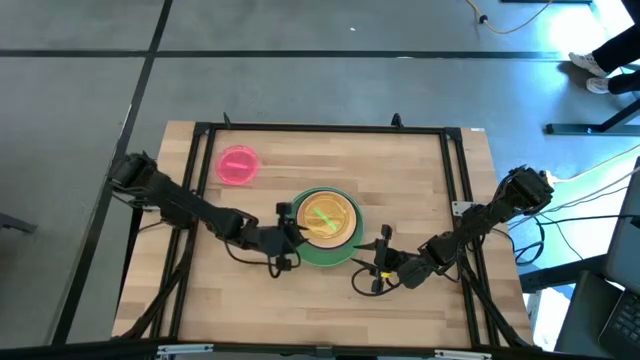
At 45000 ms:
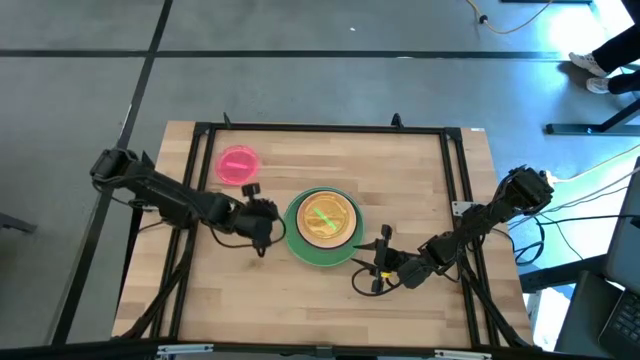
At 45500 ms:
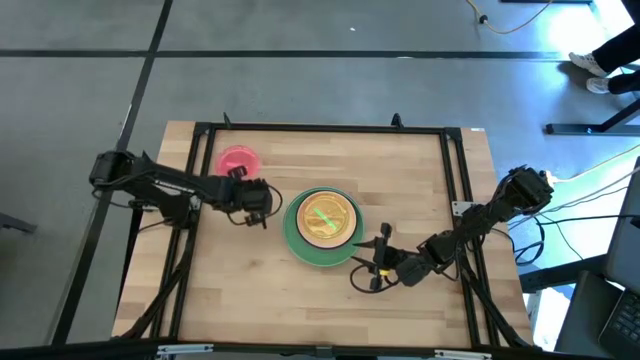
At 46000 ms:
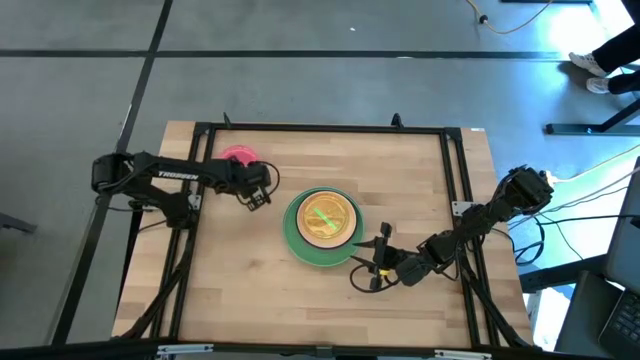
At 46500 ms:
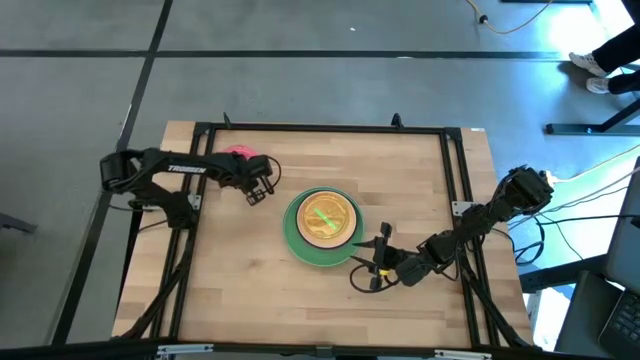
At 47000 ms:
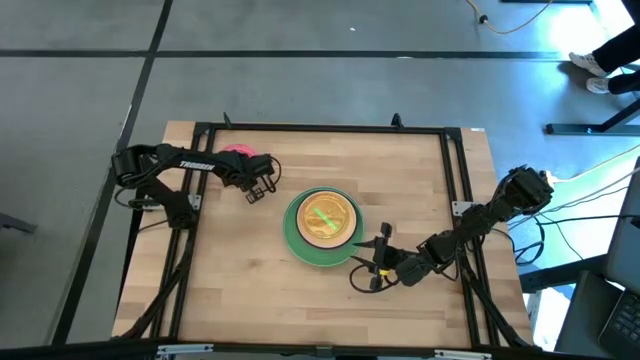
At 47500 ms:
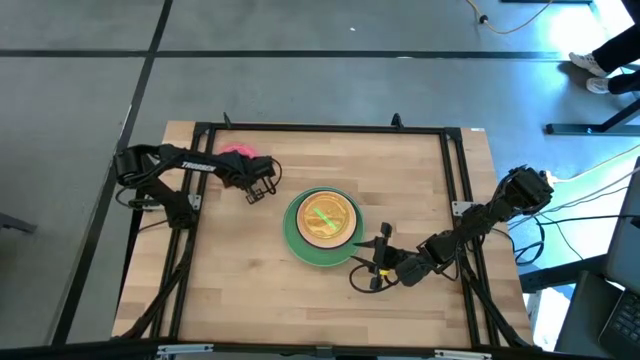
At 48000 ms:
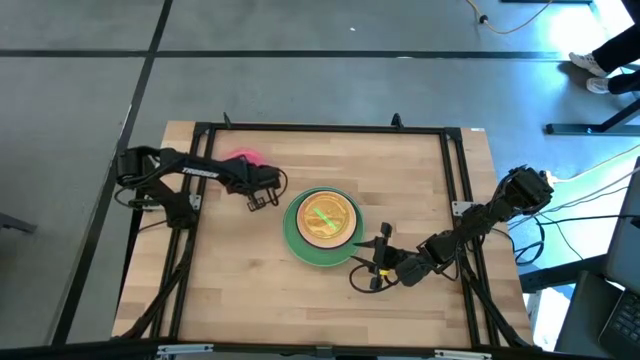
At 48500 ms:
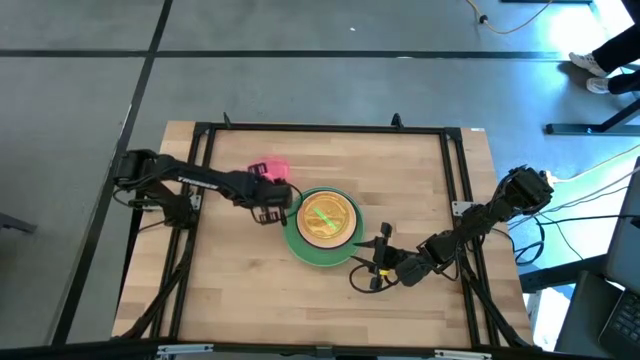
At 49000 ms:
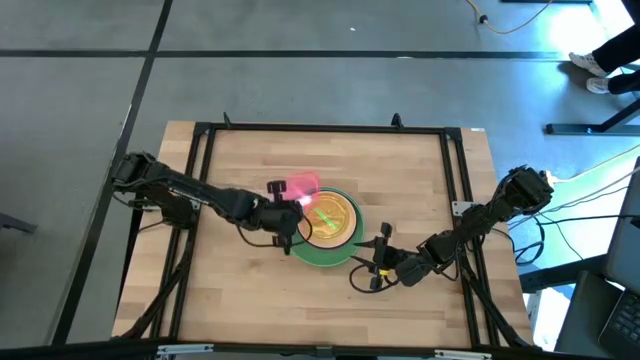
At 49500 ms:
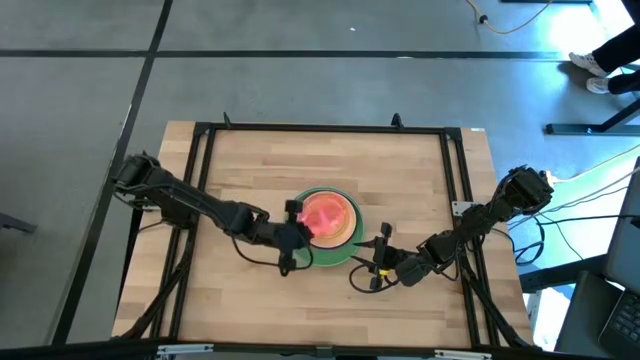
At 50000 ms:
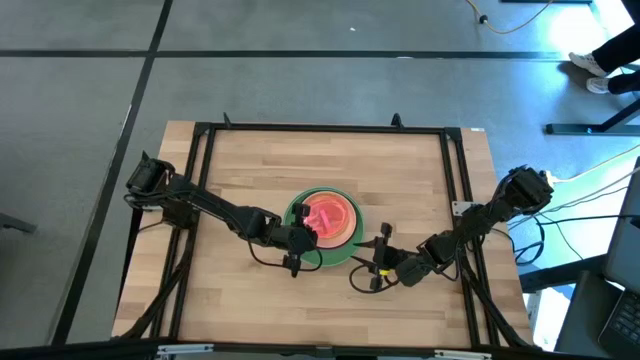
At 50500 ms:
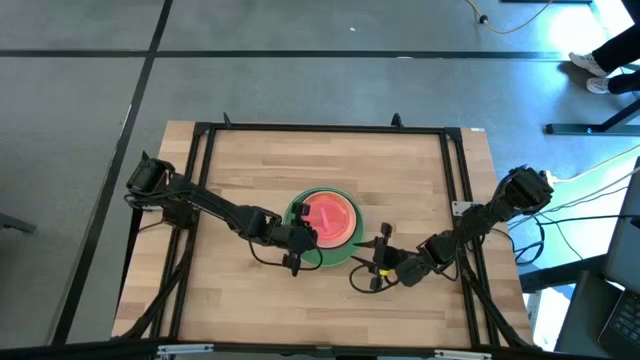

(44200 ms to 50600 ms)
Task: Stack plastic plates
Stack the pink plate on top of the light green plate

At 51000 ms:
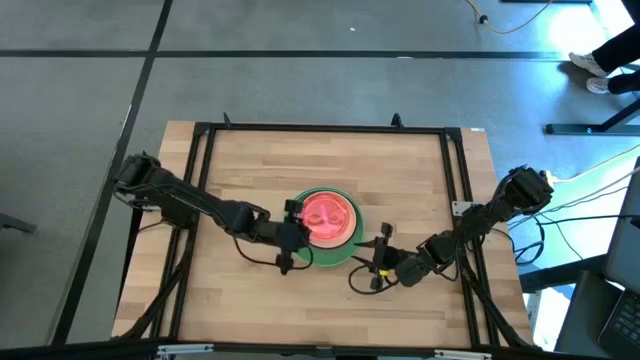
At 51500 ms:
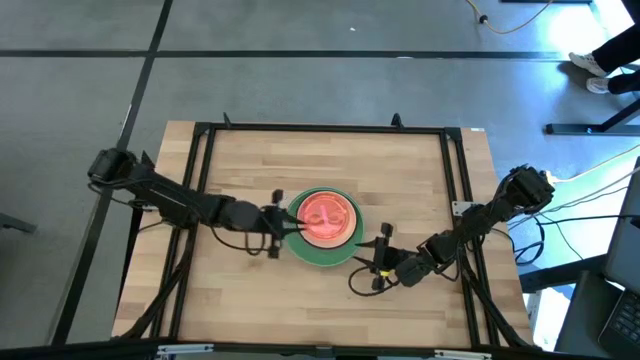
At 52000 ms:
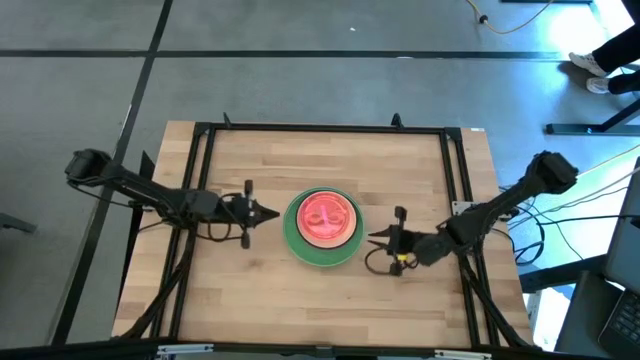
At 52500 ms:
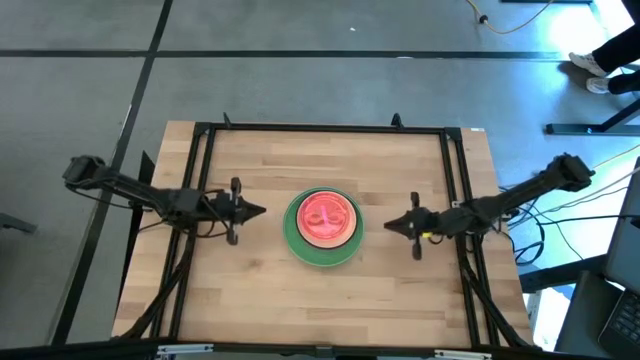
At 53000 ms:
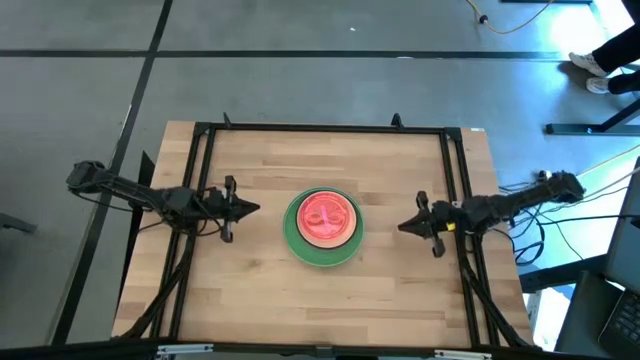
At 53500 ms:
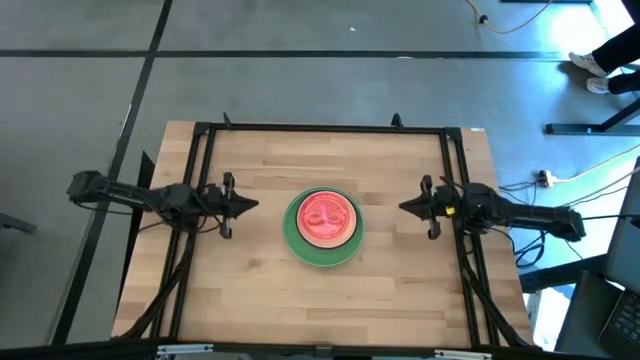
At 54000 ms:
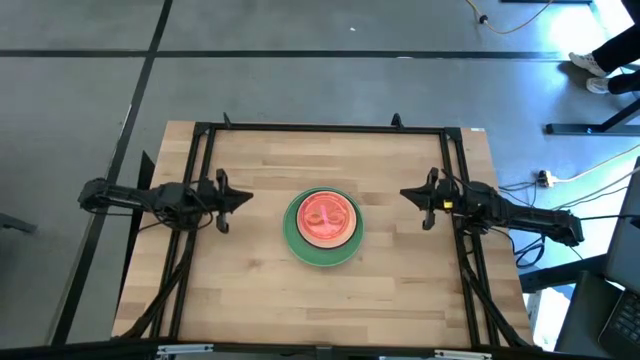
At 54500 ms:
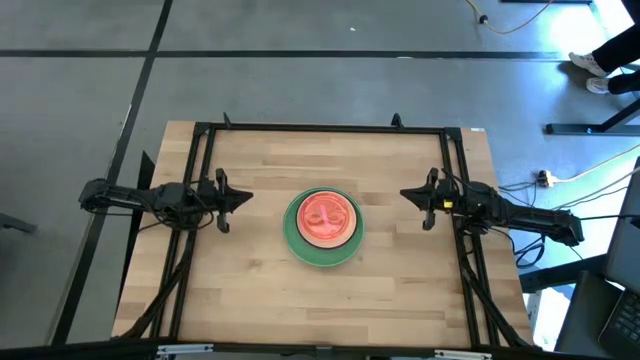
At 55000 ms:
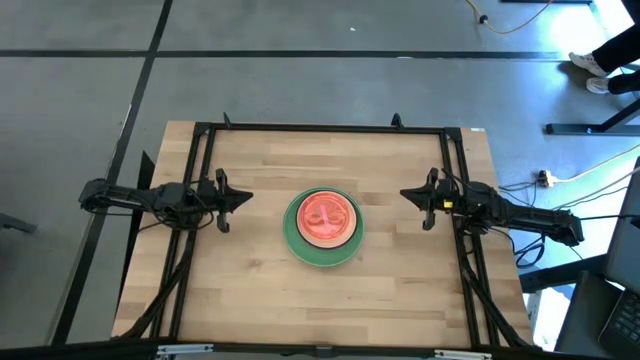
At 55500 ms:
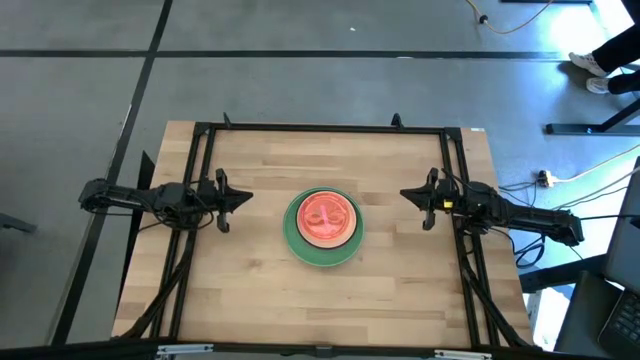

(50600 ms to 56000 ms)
Return to Home Position

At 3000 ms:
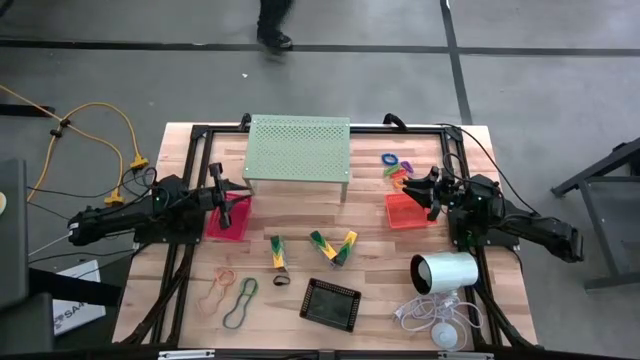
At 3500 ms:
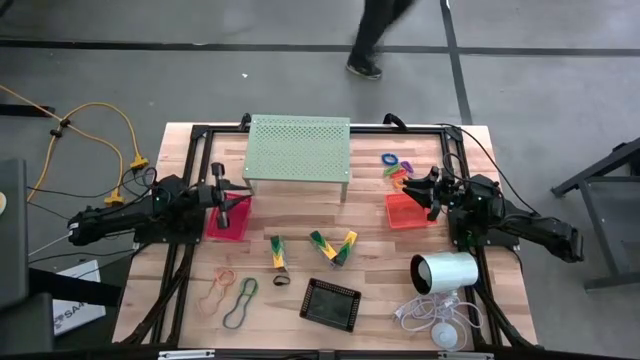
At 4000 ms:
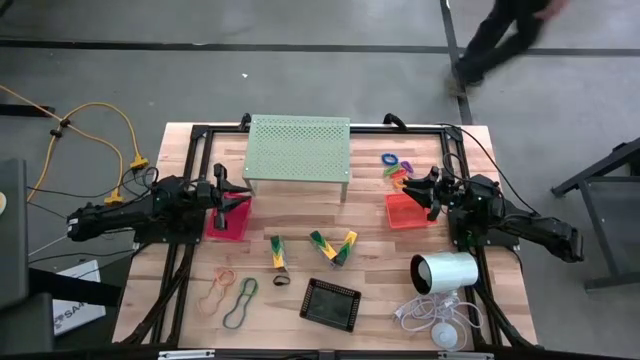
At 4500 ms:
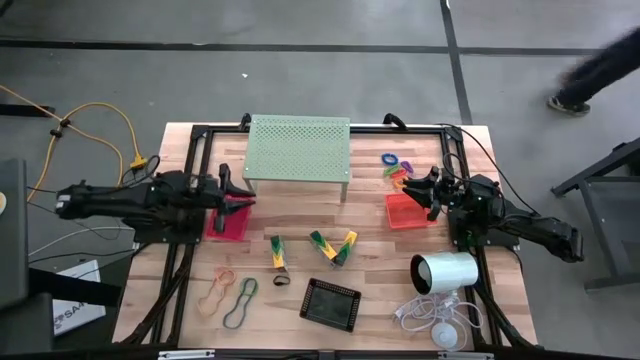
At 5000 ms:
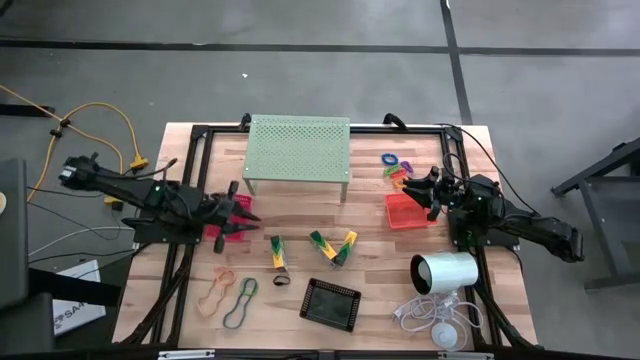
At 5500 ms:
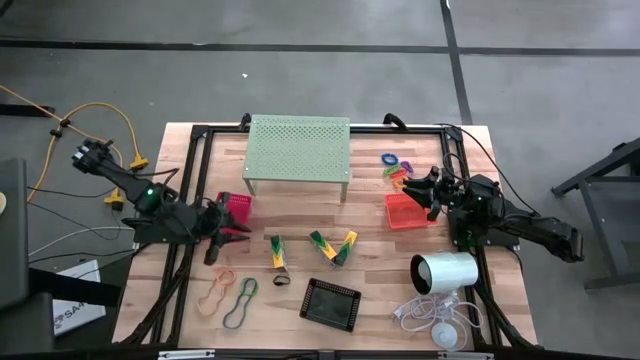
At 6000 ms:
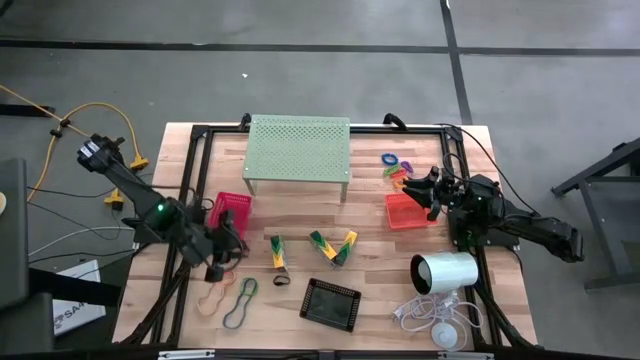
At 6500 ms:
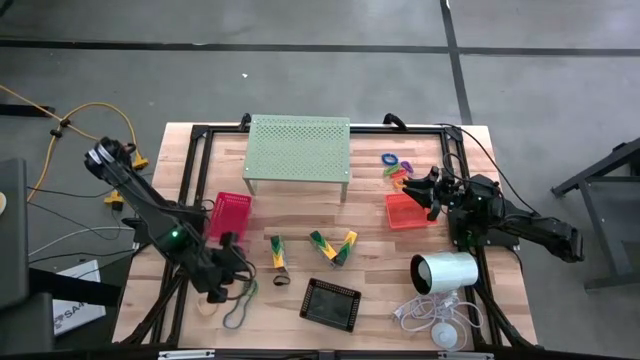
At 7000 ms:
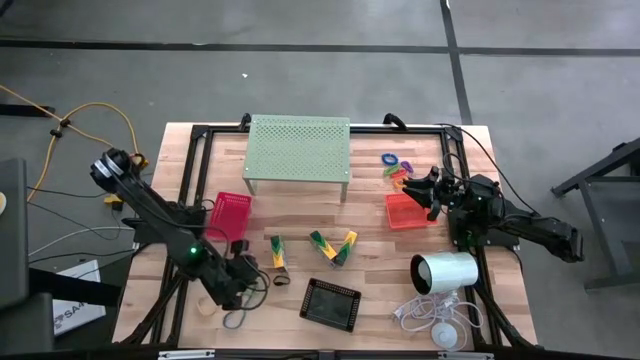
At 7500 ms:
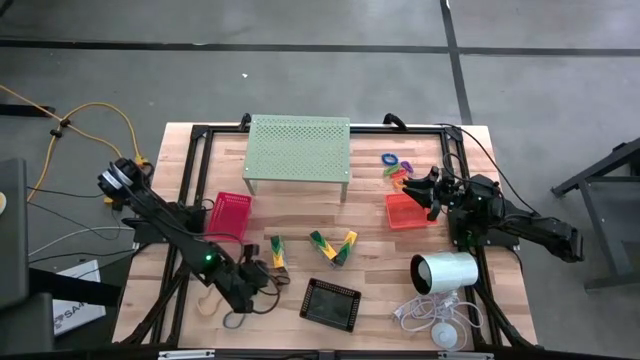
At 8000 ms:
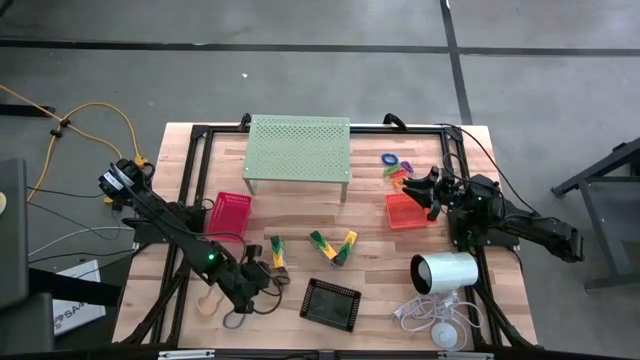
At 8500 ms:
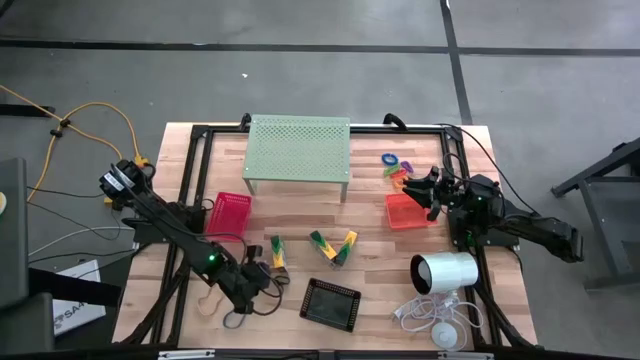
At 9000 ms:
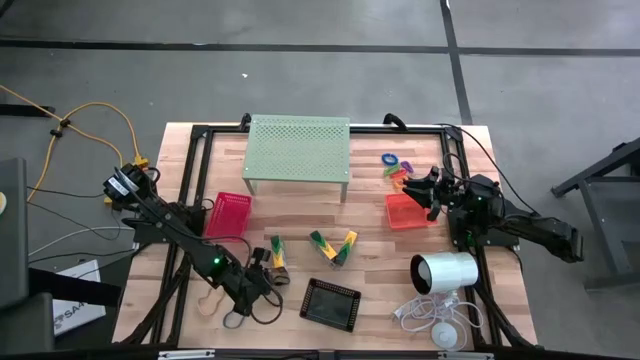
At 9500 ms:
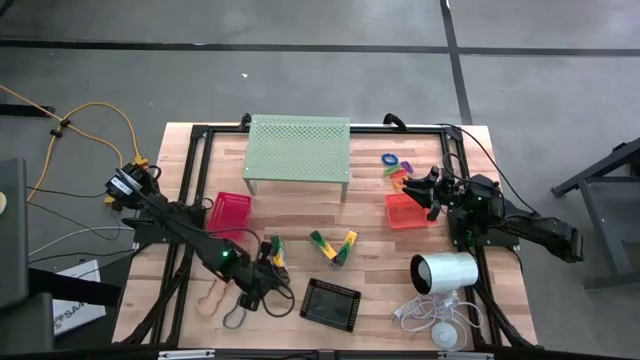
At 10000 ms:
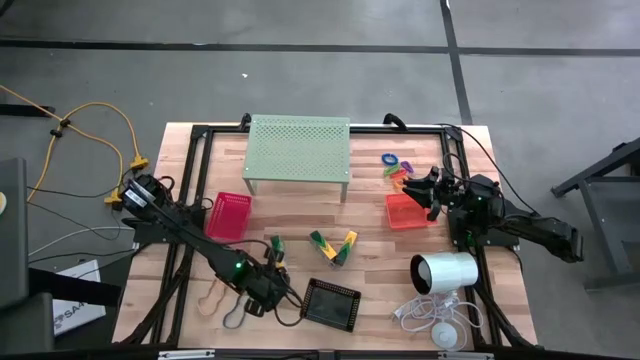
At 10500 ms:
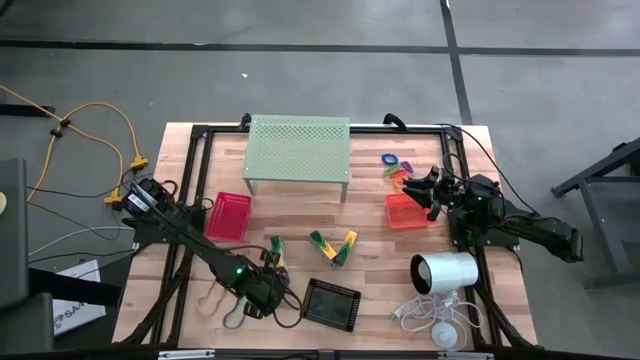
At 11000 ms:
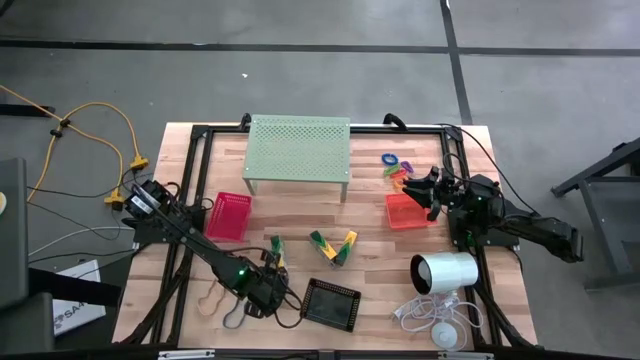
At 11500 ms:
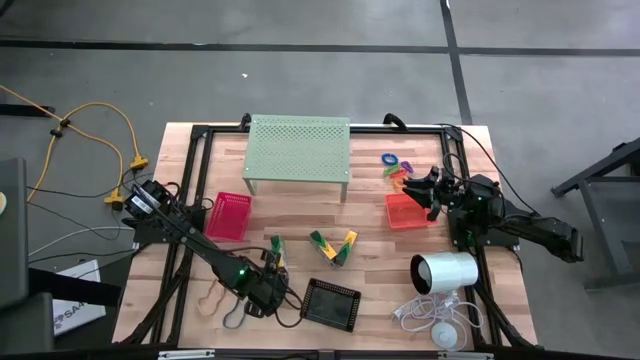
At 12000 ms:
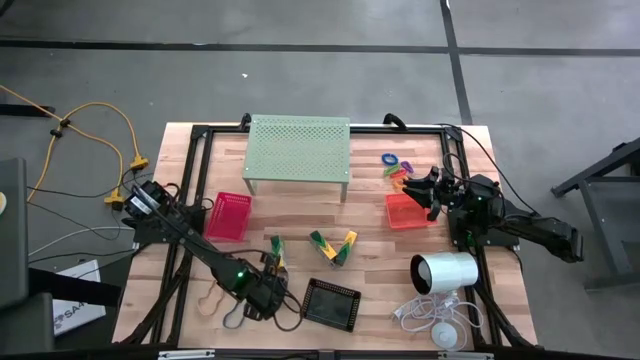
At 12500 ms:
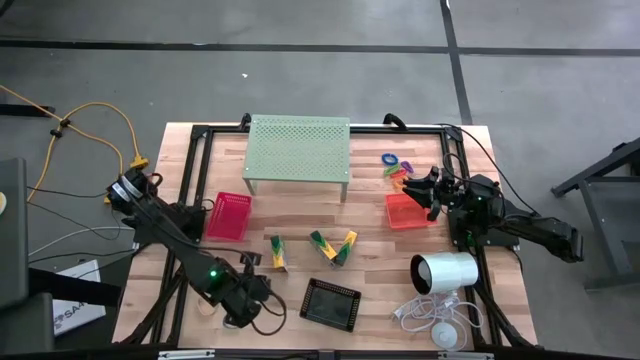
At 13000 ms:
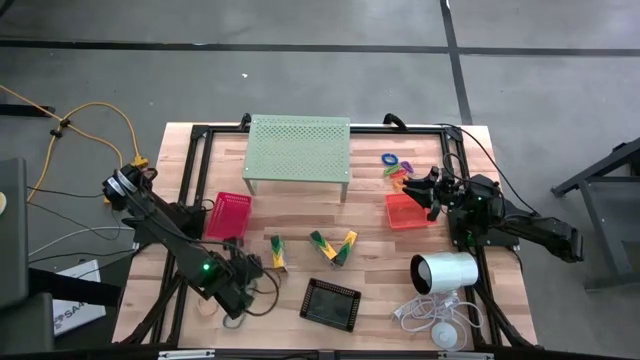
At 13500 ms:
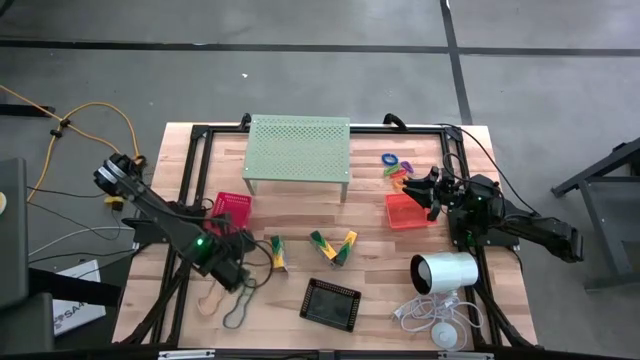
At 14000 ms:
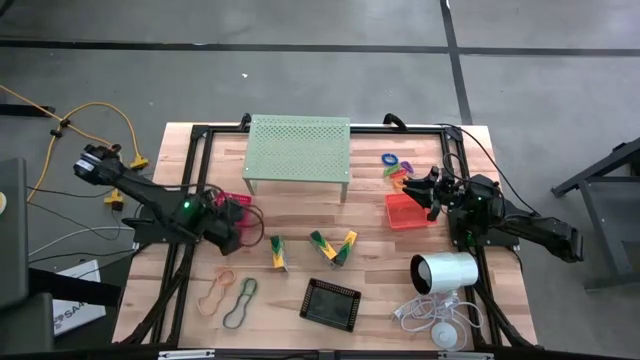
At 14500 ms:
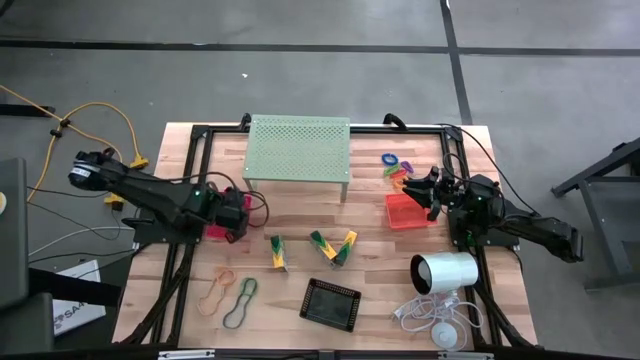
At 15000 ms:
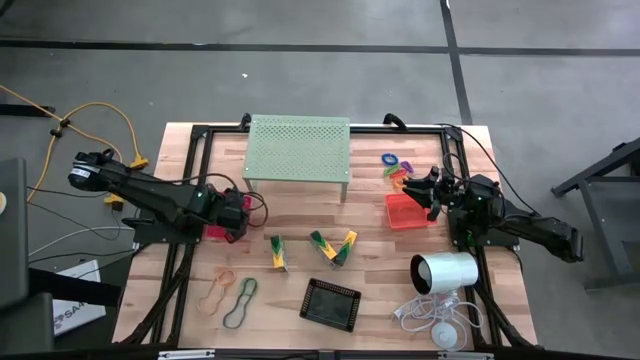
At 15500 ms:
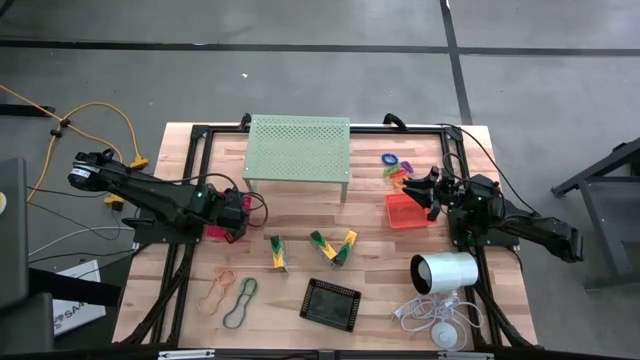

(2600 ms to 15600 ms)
Task: Pick & Place Office Desk Supplies
Put the black rubber band into the red bin
